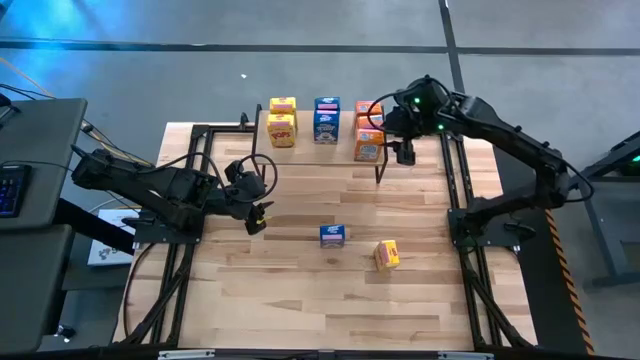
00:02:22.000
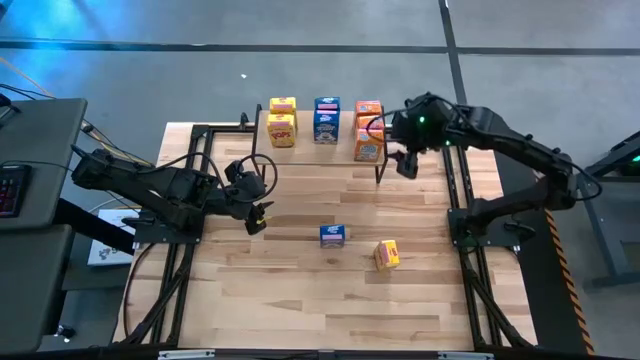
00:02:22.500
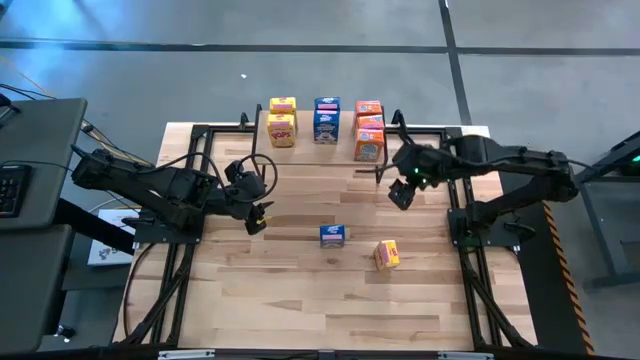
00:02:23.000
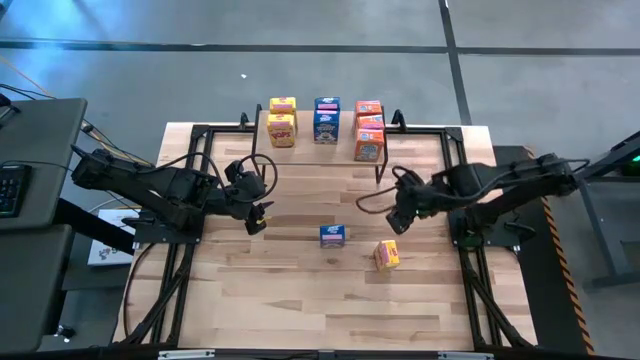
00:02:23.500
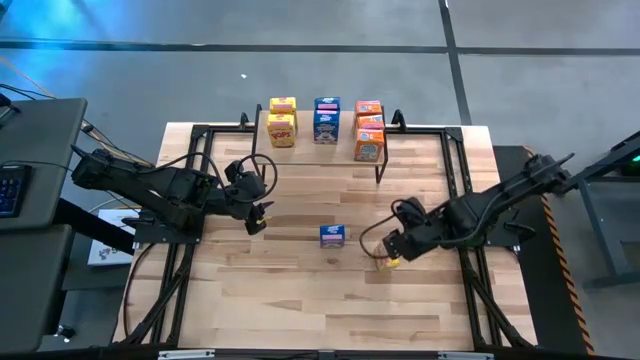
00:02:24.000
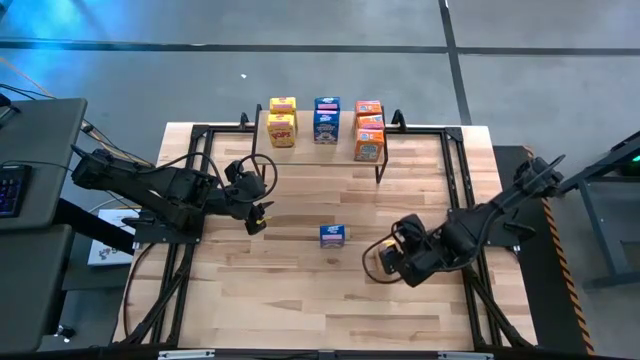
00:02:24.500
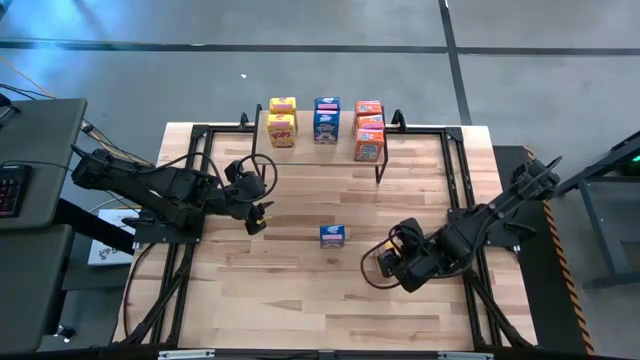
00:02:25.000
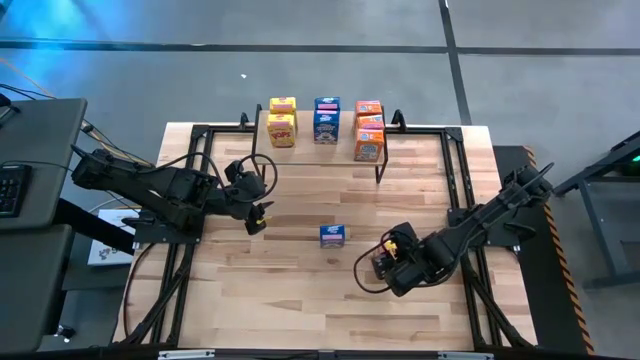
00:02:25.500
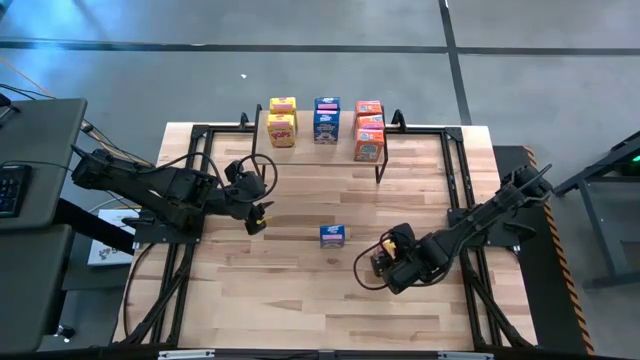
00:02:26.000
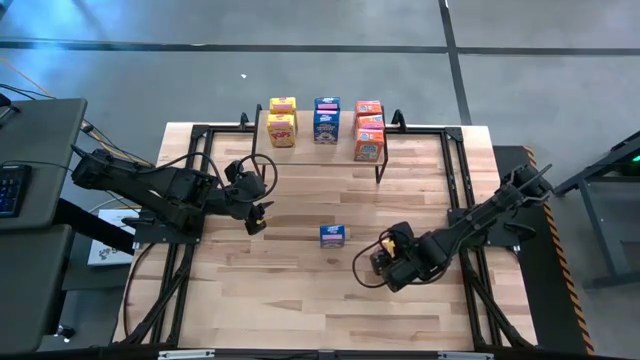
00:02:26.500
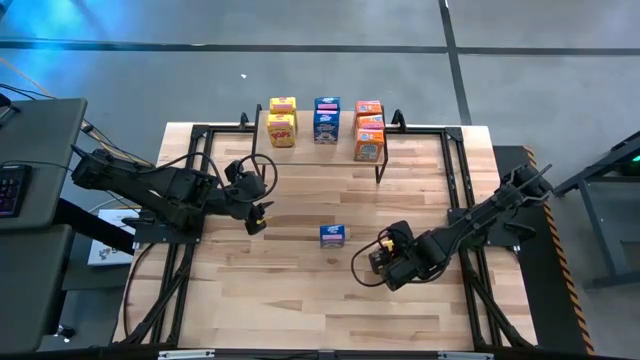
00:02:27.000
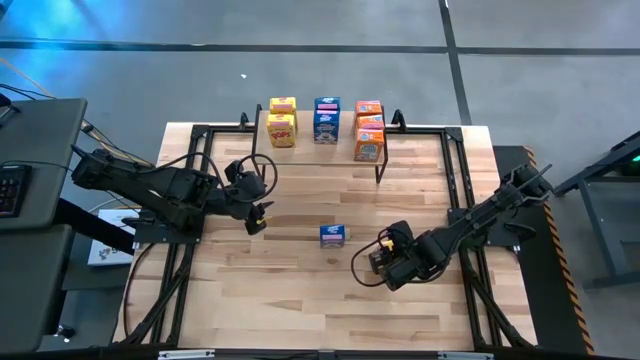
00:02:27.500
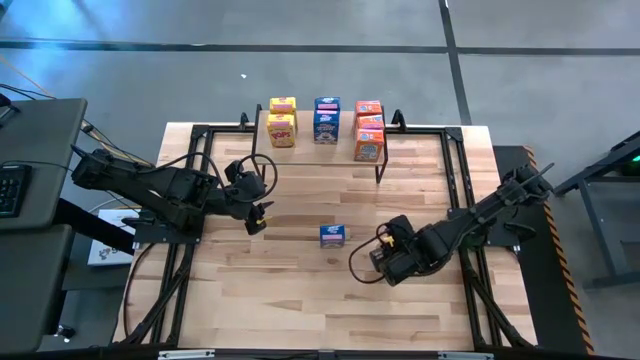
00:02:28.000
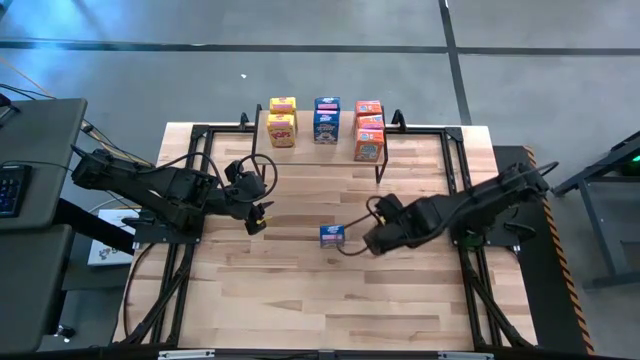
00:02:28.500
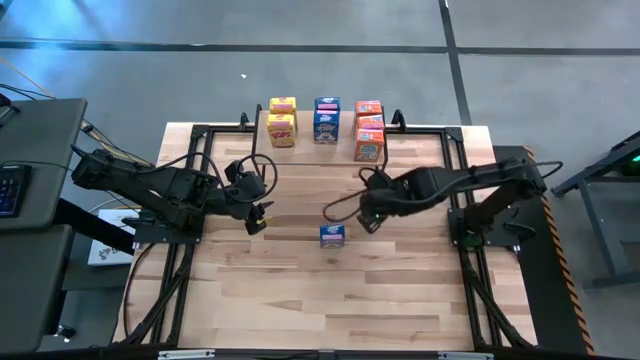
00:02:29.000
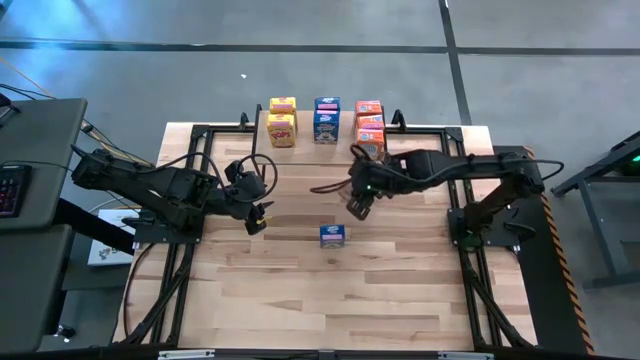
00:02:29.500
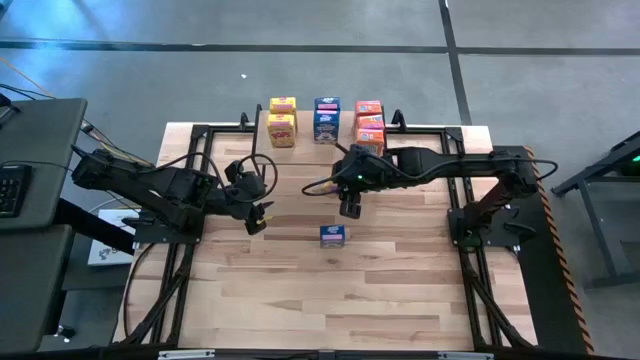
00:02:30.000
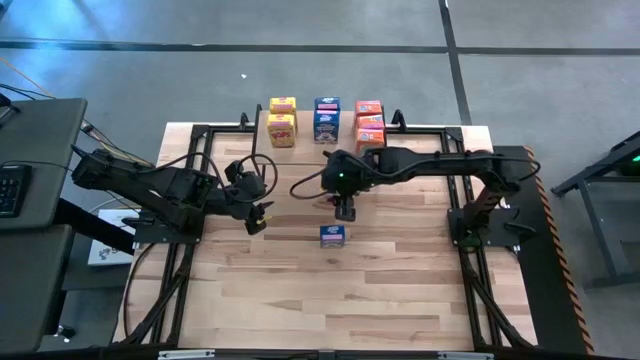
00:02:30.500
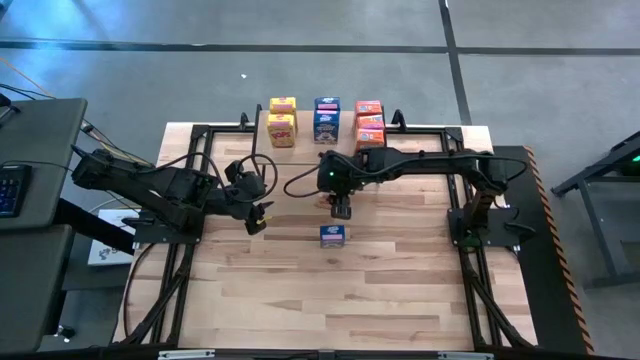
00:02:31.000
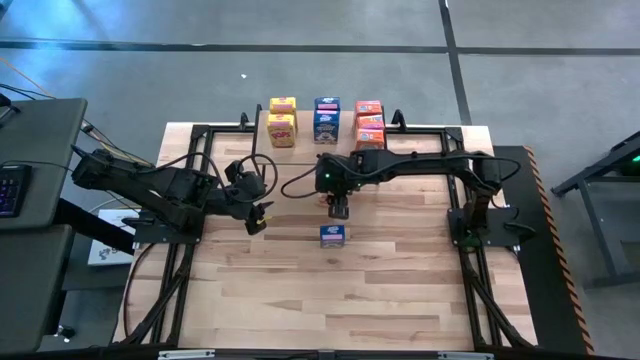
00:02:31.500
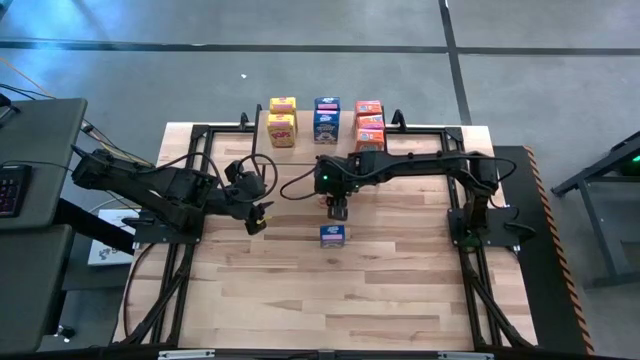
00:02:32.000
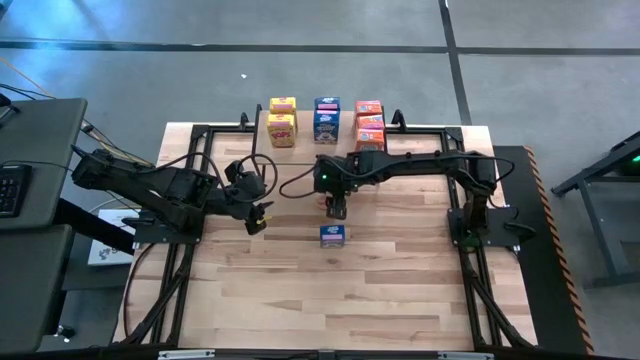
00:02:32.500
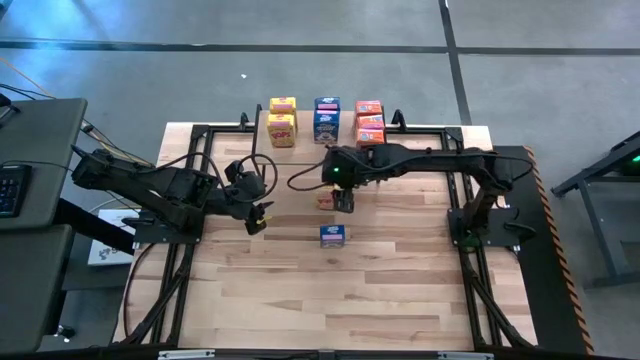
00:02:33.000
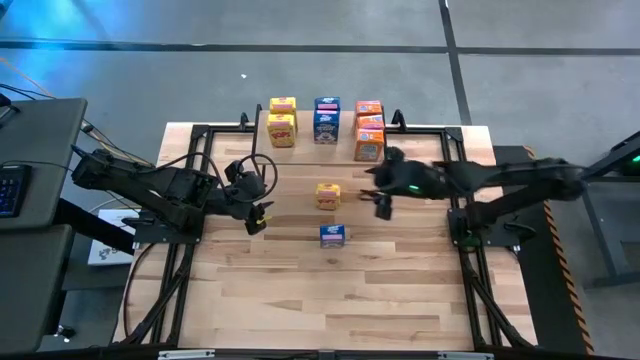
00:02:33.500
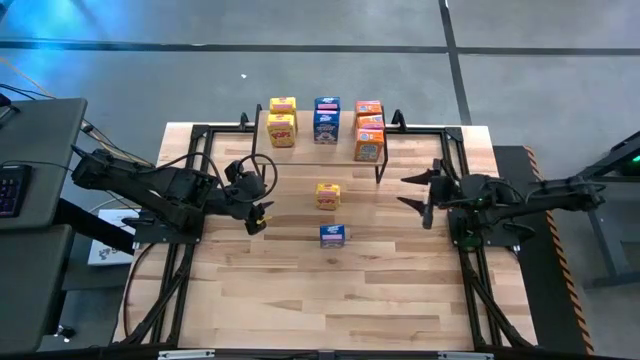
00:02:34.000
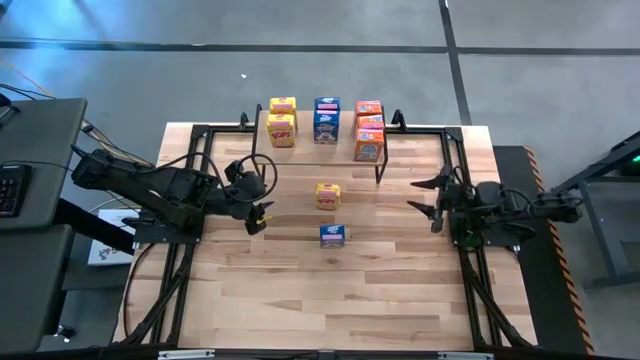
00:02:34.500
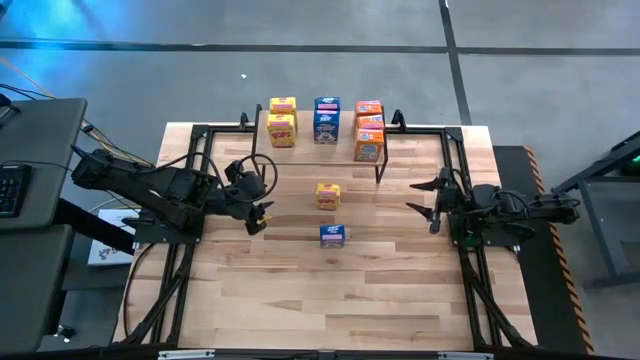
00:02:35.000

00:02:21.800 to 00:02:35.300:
Task: Stack cereal on shelf
Put the yellow cereal box on the shelf aligned with the other yellow cereal boxes

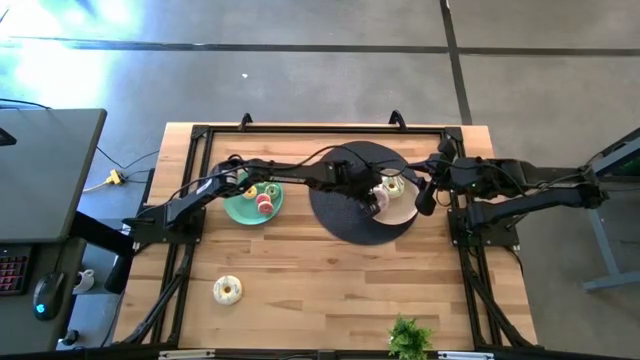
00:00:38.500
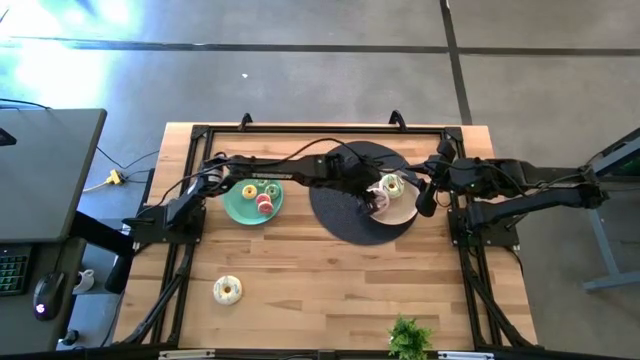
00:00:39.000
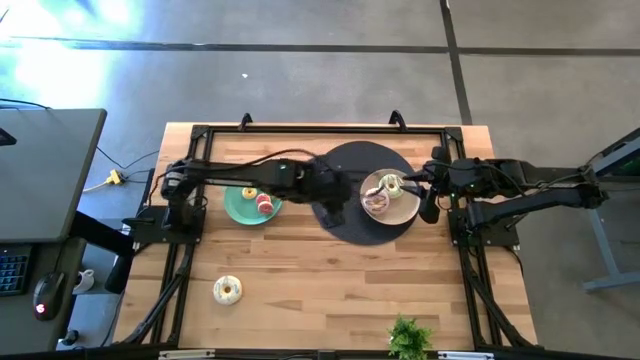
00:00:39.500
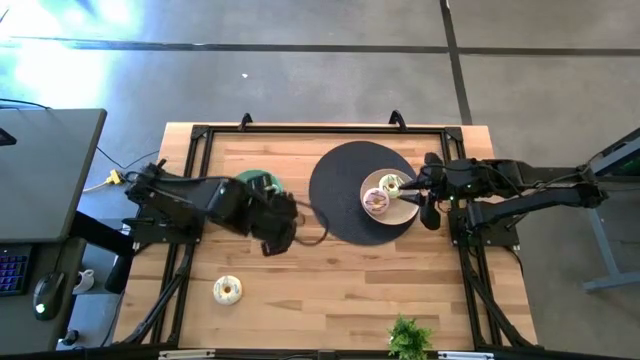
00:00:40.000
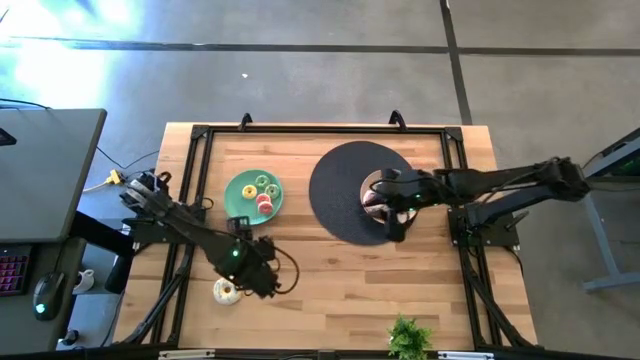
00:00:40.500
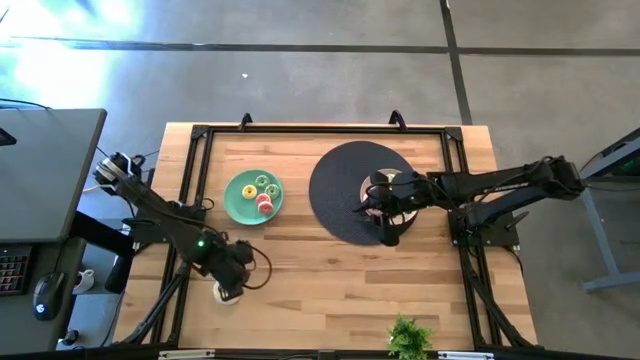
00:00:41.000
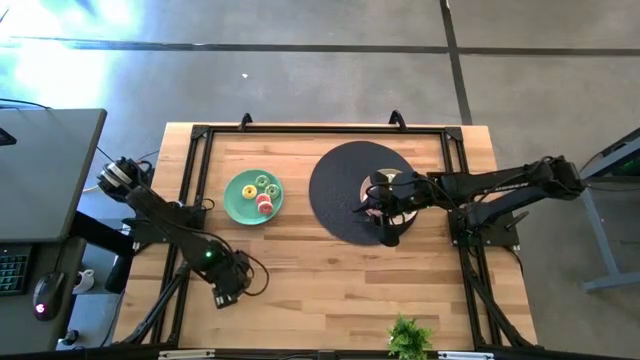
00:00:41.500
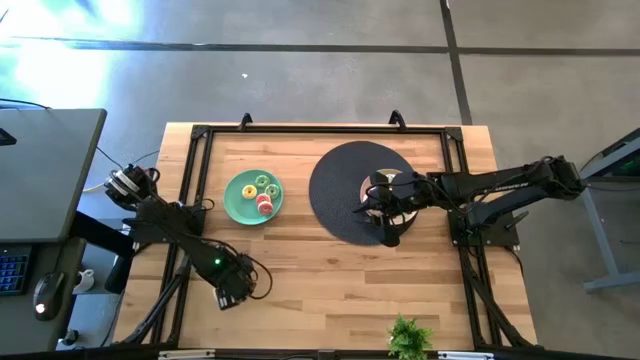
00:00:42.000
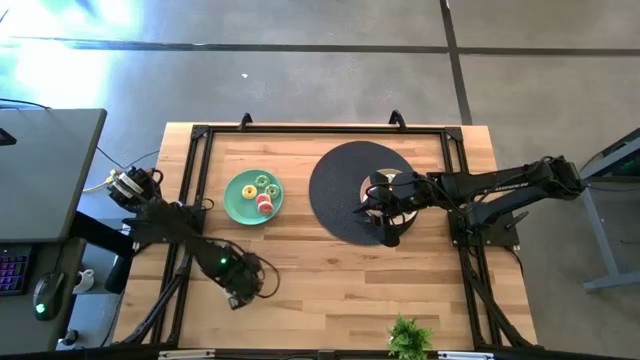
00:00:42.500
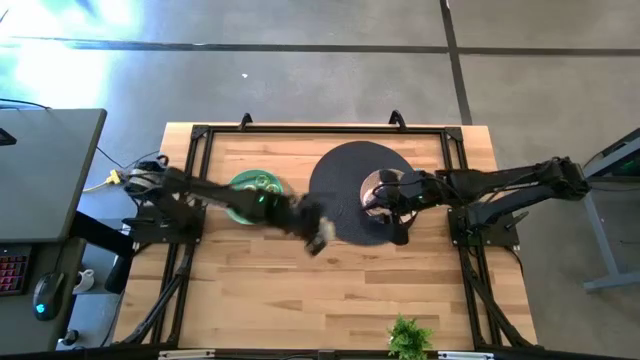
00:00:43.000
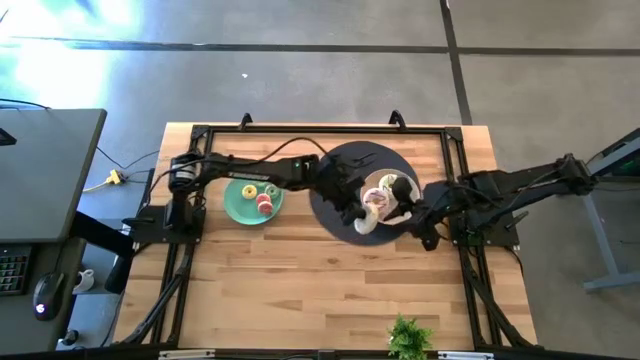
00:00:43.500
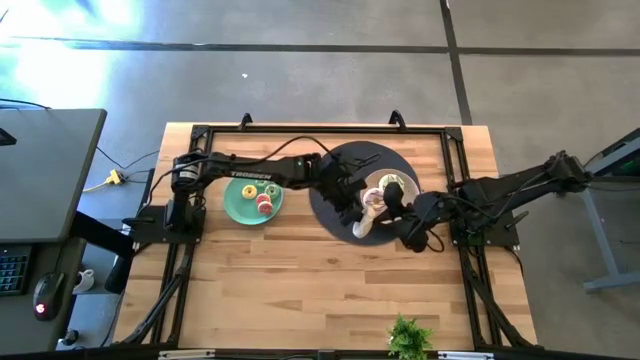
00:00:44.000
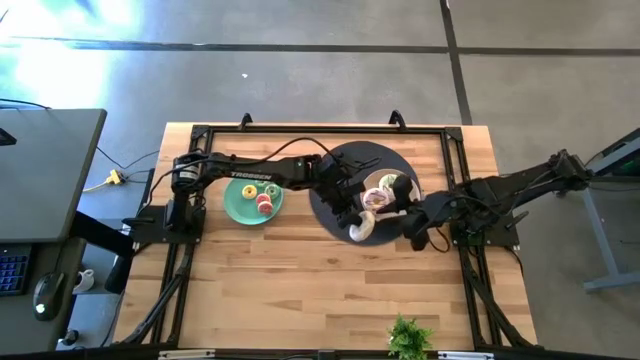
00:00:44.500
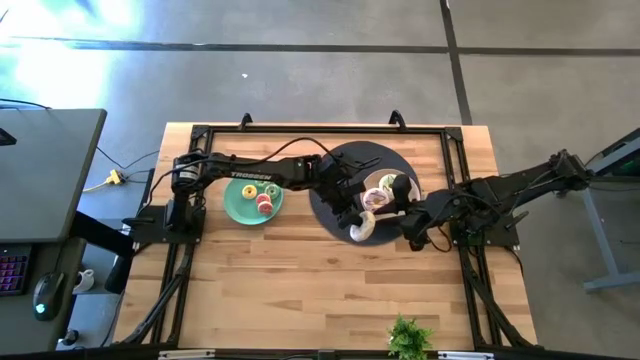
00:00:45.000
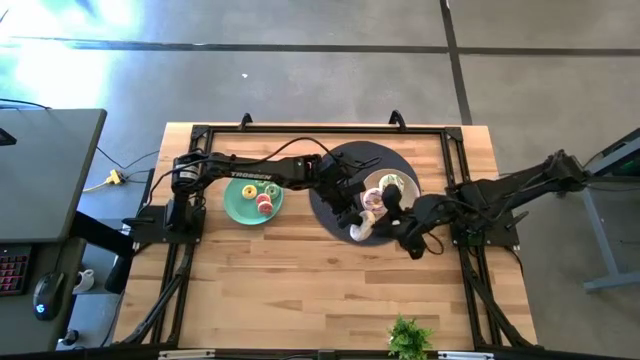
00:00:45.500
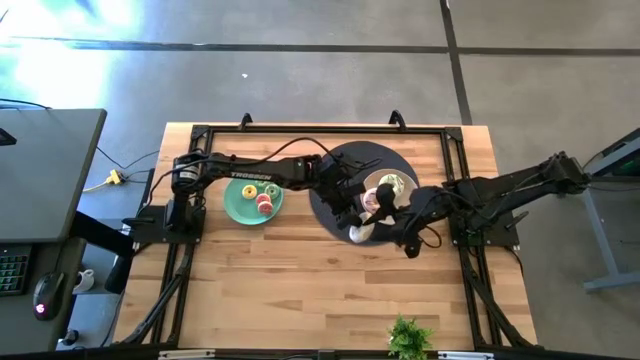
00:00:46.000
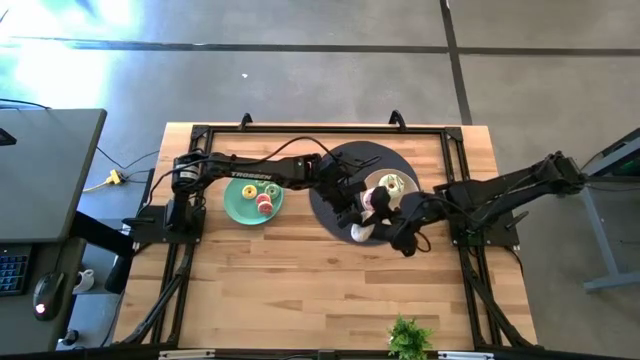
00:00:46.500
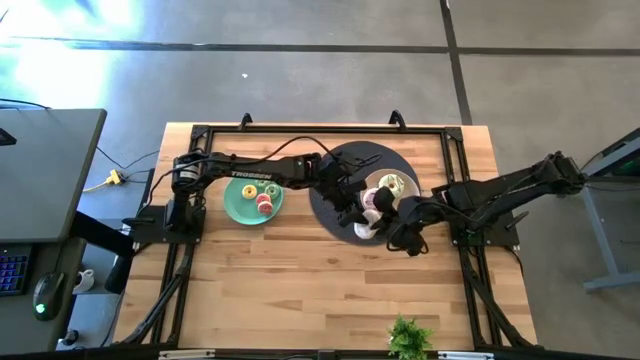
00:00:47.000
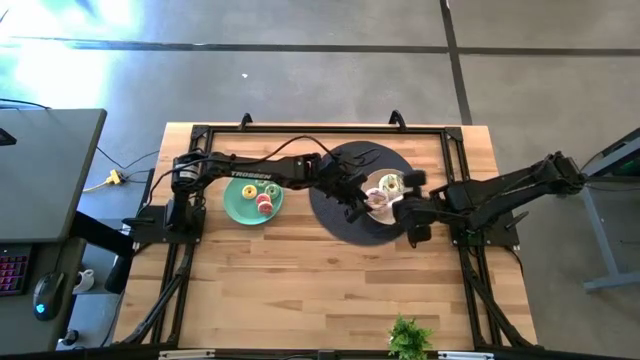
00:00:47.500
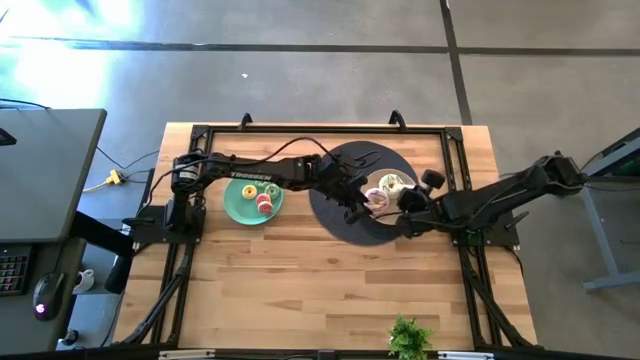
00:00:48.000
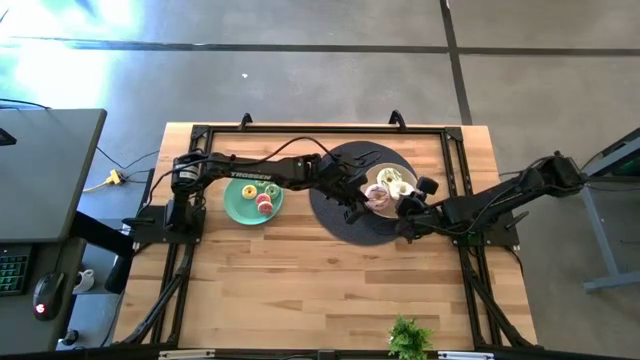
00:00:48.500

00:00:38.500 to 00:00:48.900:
Task: Pick & Place donuts
Put the large white donut onto the white plate
